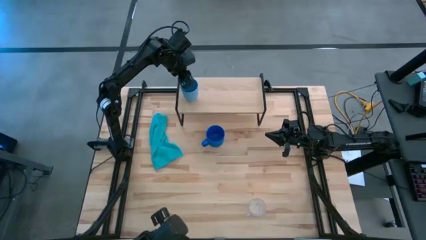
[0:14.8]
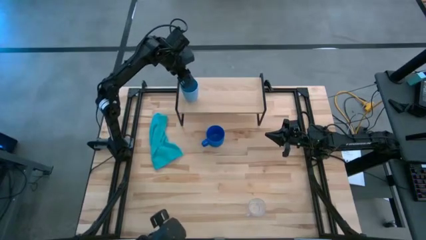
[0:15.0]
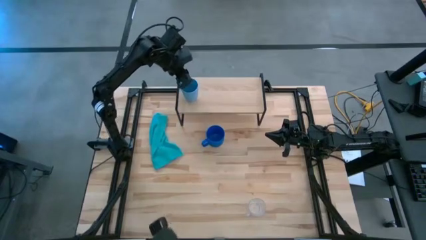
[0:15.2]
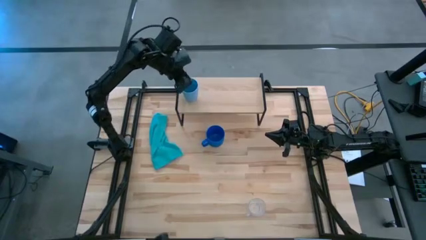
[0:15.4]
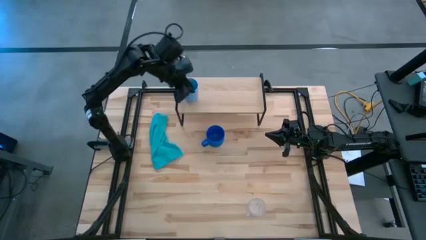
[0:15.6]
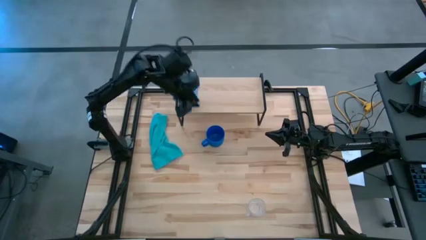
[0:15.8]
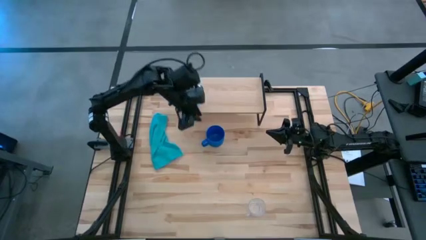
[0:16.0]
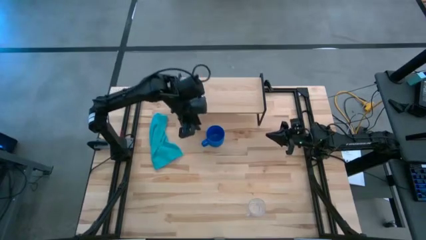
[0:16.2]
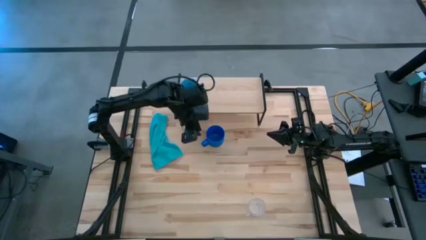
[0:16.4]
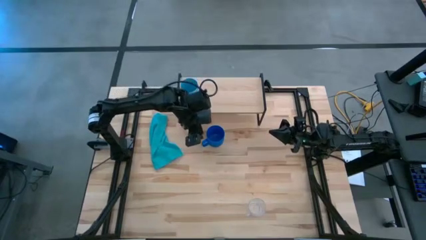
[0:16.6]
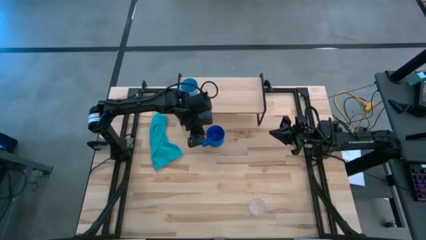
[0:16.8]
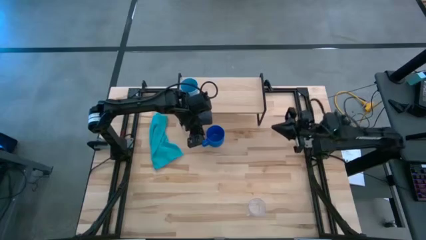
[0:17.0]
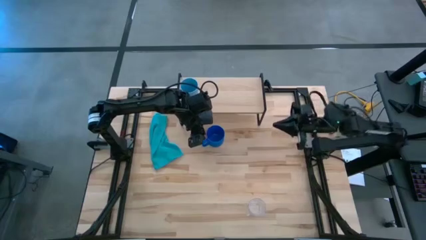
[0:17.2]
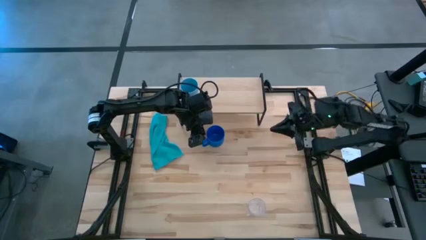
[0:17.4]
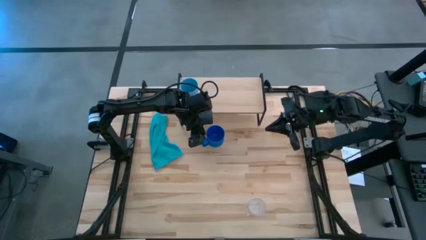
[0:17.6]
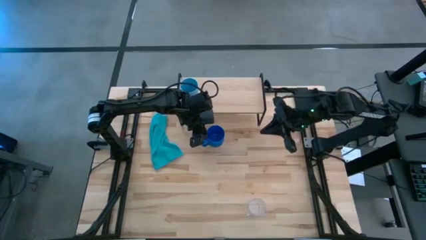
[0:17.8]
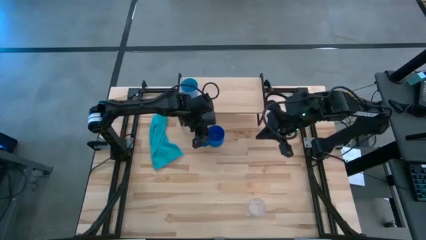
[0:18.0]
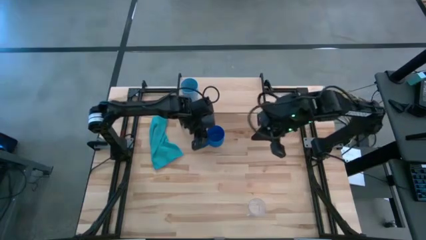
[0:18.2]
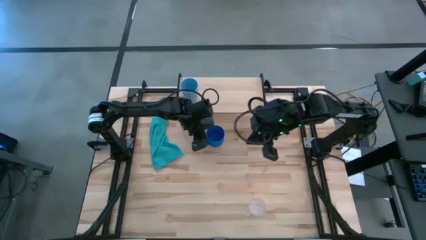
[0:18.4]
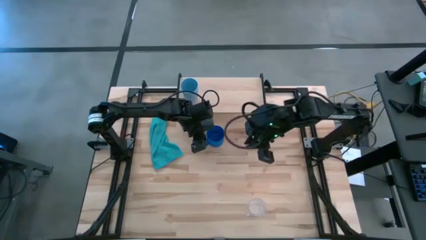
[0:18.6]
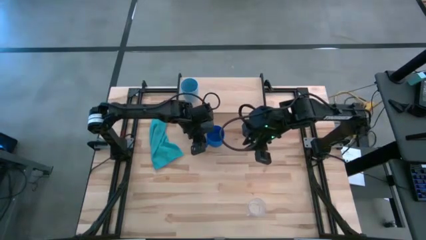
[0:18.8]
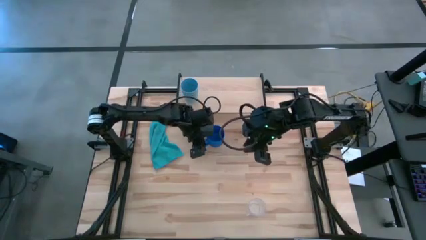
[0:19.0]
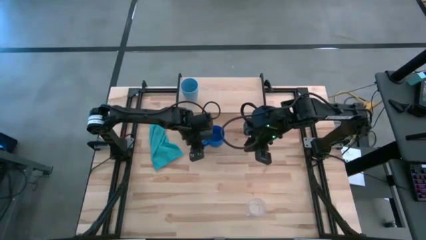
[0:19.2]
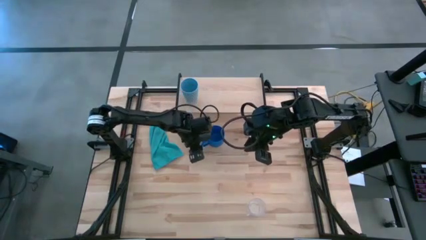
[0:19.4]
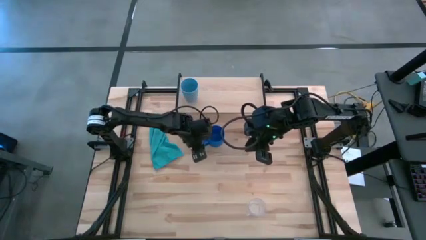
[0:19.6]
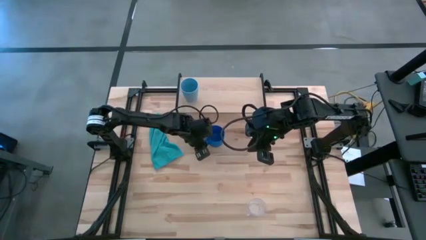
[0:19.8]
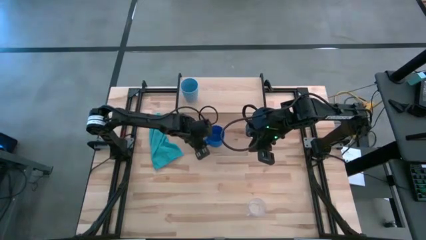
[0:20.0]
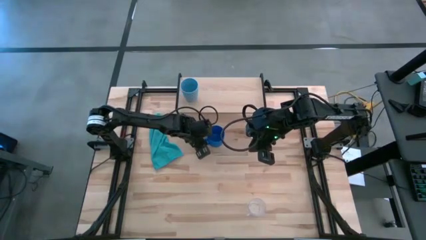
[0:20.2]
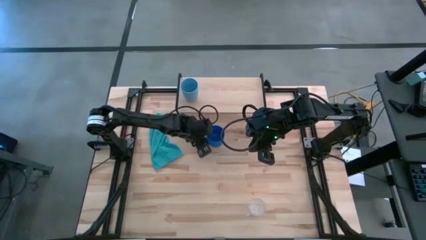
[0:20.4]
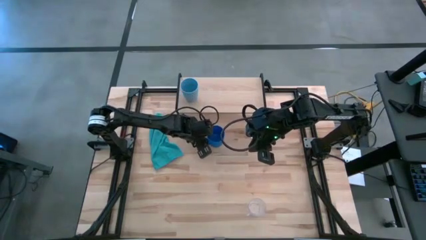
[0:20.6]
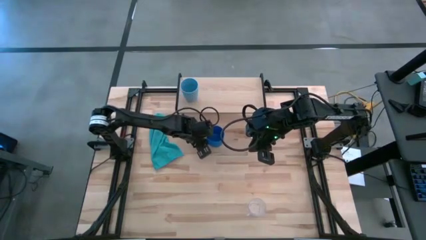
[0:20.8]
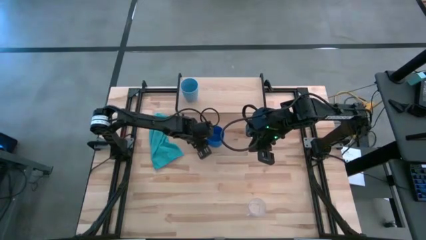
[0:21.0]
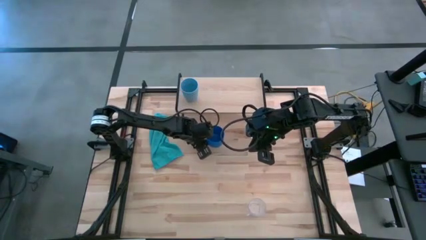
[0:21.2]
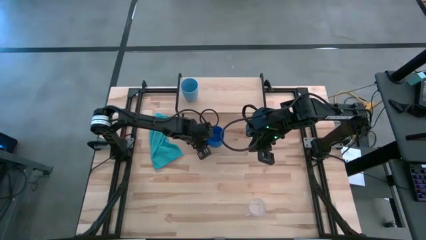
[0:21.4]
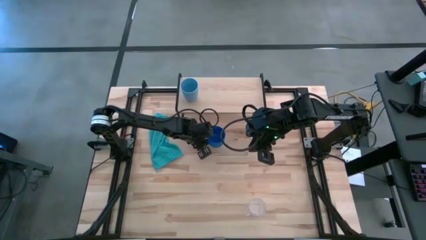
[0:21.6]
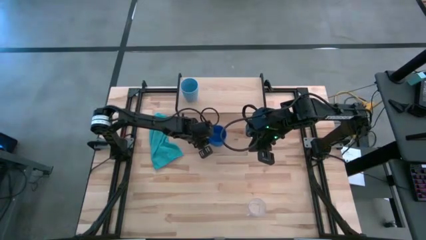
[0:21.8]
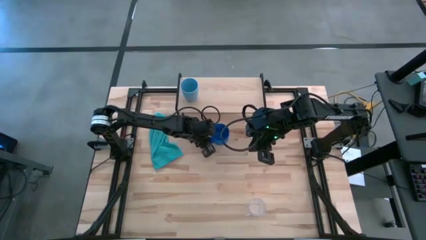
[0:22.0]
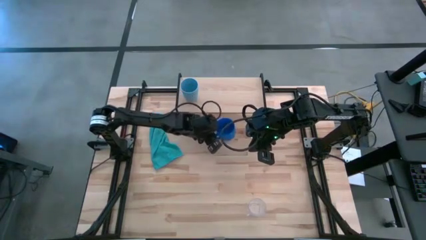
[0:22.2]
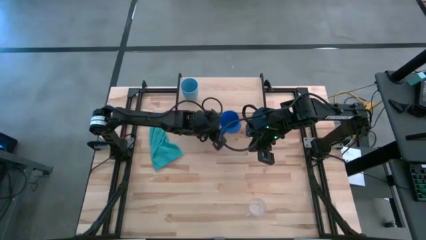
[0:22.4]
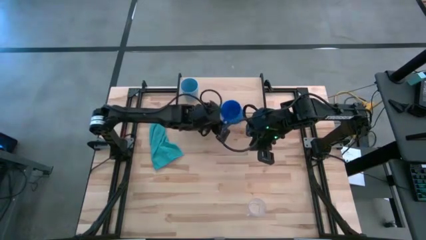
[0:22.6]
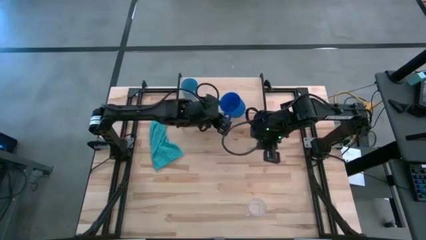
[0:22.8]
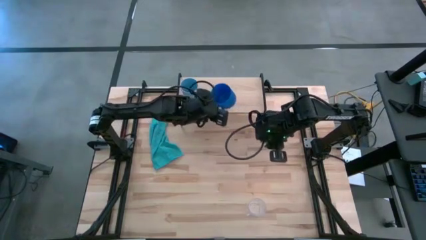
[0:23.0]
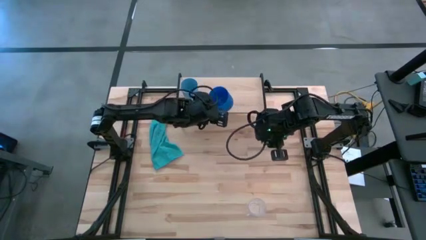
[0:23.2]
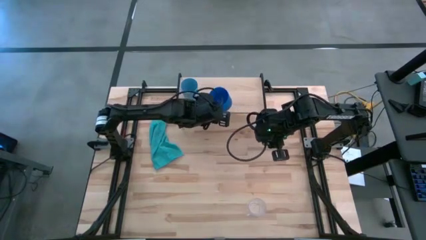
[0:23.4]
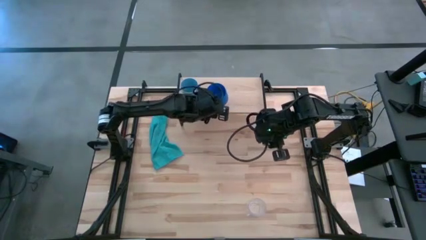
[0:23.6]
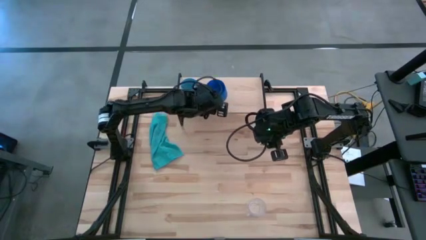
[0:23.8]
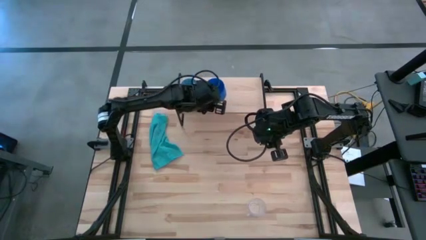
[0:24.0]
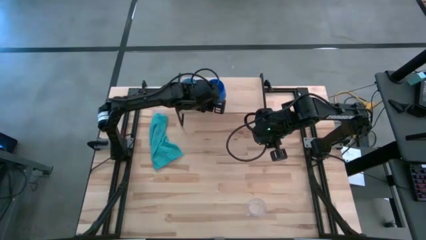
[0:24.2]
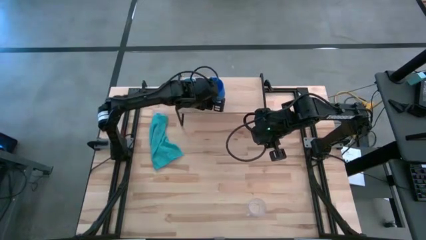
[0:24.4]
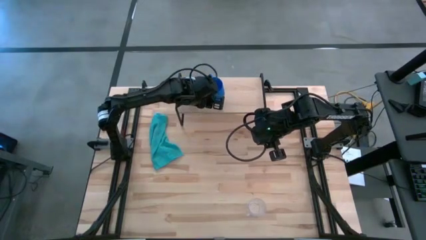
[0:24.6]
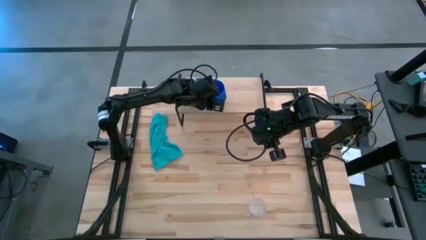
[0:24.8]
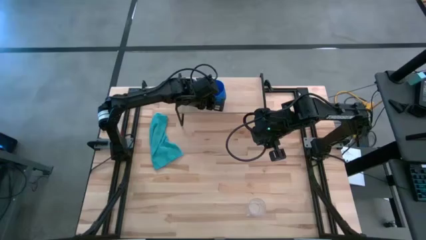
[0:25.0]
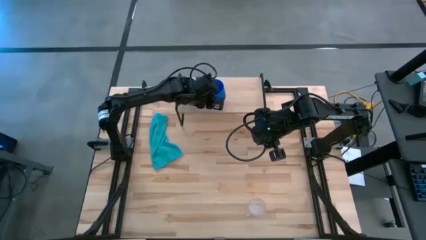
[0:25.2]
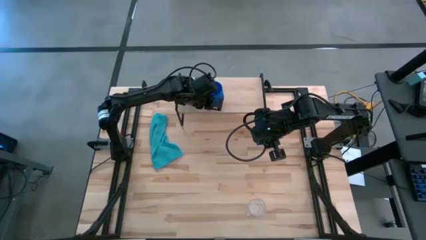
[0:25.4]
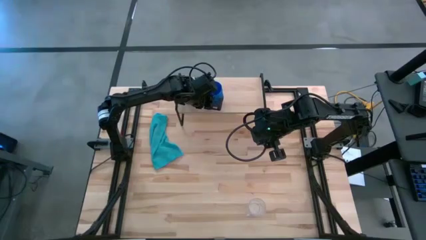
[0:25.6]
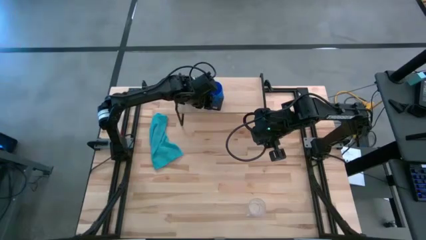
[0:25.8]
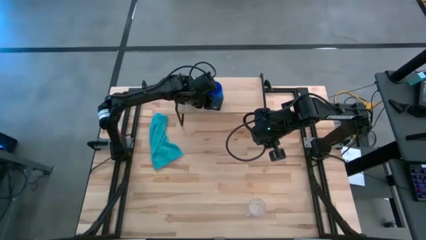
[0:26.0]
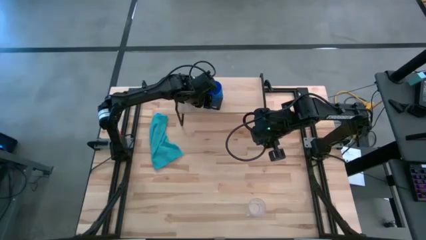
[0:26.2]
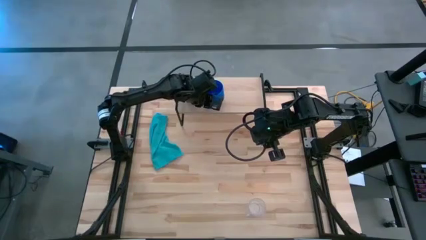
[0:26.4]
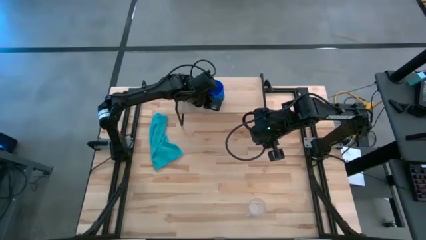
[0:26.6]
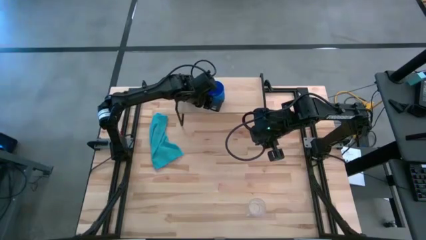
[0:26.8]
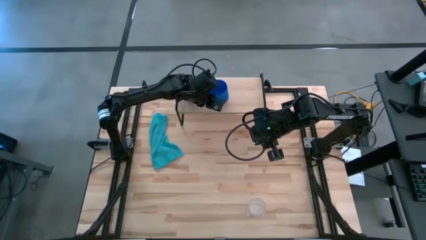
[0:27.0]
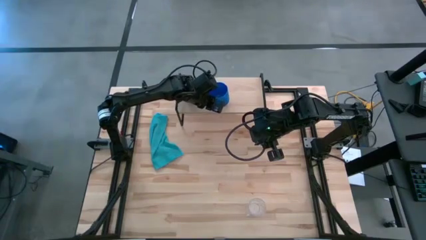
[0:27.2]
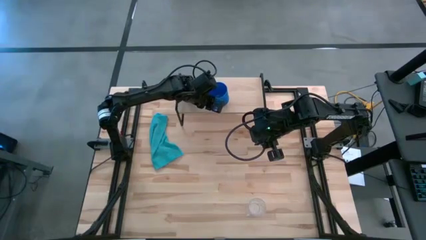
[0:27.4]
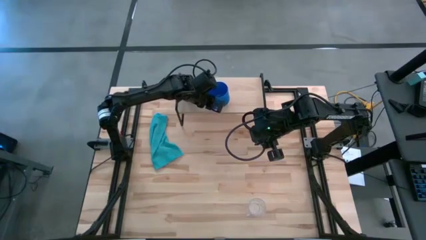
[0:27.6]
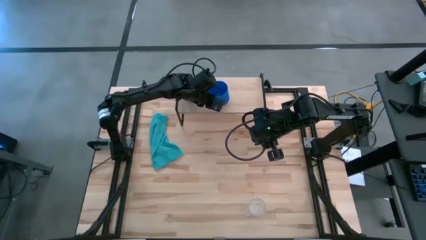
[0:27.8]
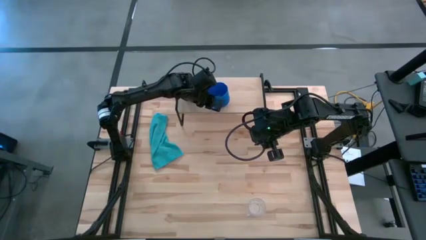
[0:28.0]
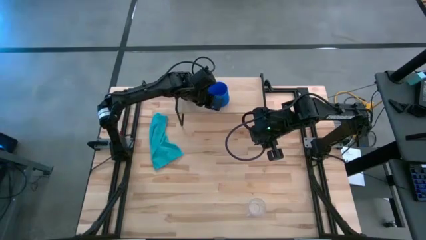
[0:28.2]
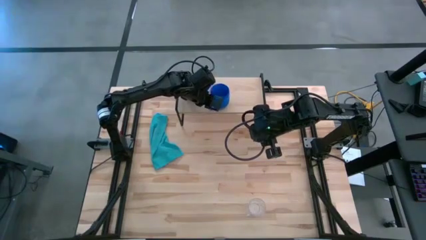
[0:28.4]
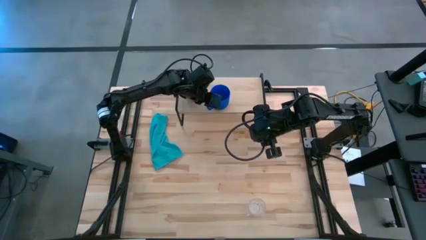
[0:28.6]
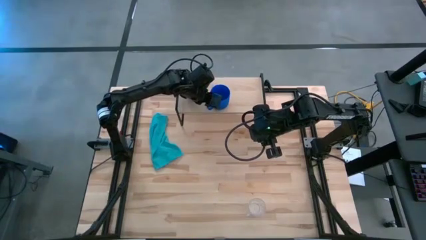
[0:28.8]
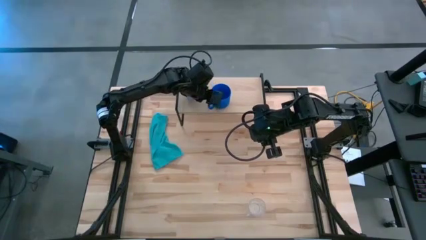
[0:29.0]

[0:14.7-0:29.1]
Task: Stack small to large cups/mugs on shelf
Put the blue mug on the shelf

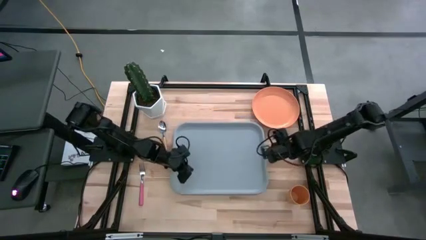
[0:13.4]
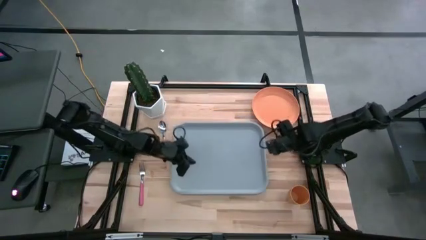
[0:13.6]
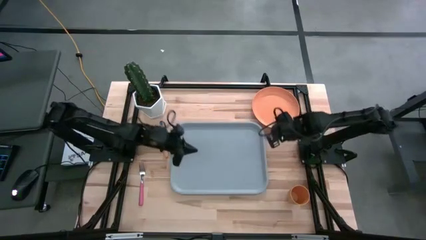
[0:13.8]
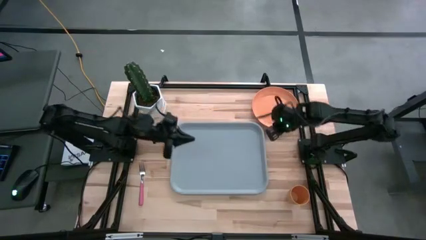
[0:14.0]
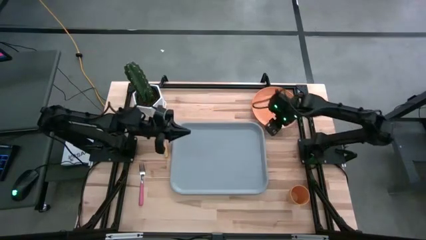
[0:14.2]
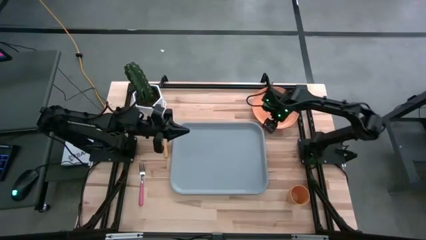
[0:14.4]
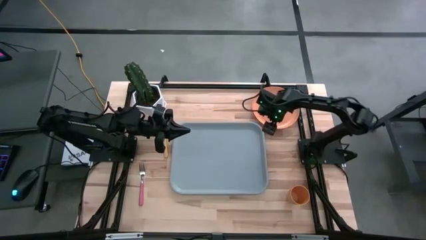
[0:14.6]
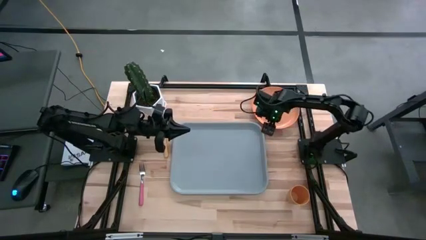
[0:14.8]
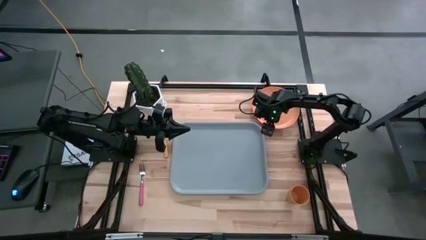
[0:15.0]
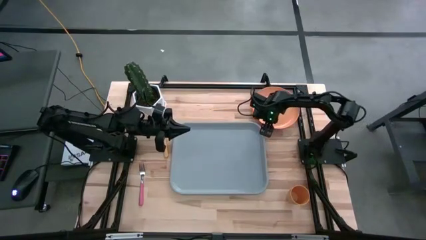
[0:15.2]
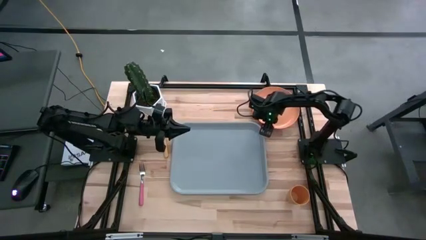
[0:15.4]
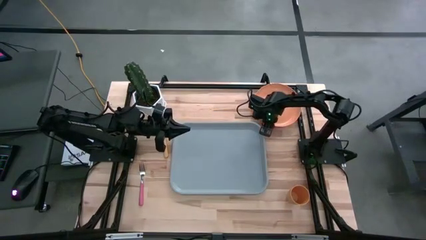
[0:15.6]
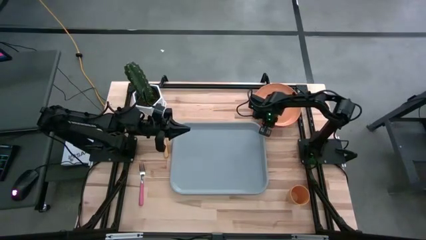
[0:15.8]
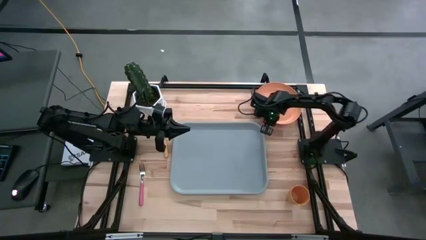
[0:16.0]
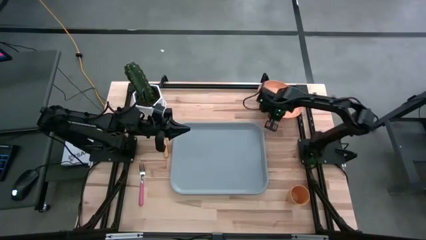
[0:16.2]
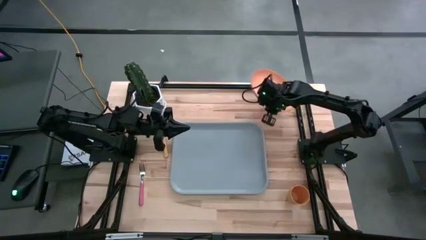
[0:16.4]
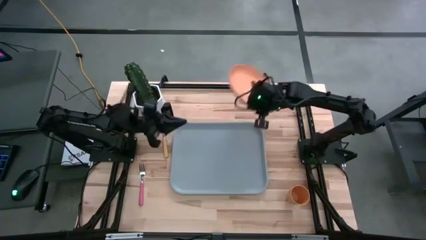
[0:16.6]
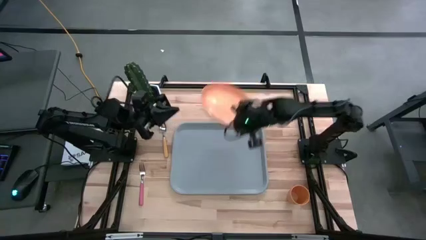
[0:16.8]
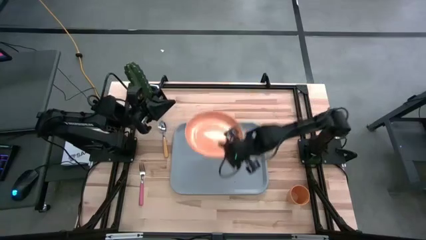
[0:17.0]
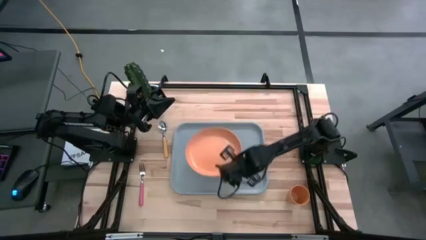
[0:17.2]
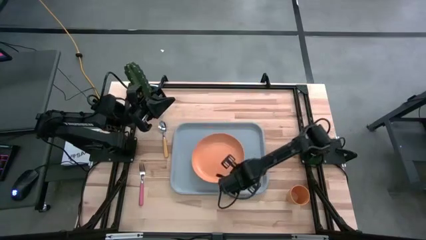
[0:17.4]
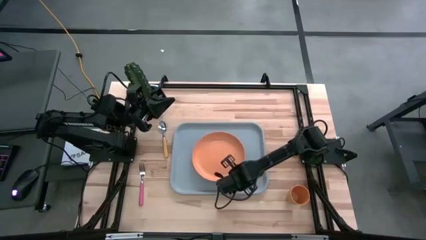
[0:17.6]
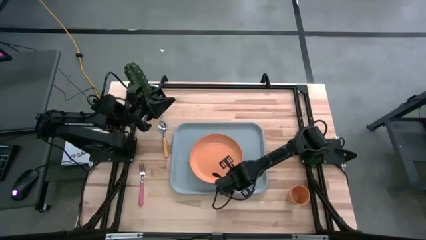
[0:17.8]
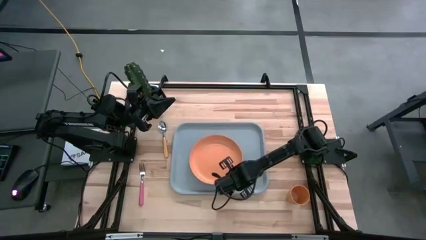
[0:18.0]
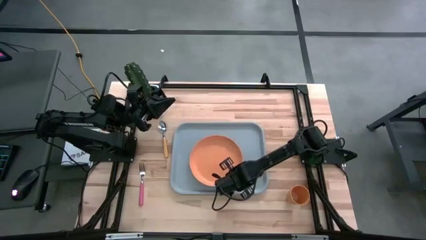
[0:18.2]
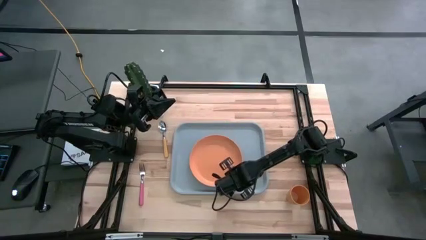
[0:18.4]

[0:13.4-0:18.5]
Task: Pick and place plate/cup/fork/spoon on tray
Put the orange plate on the gray tray
